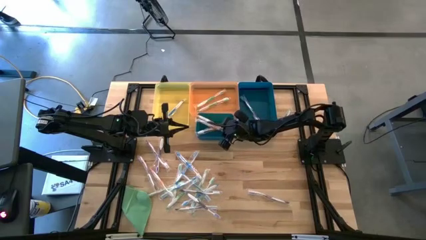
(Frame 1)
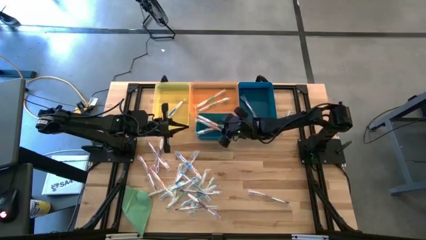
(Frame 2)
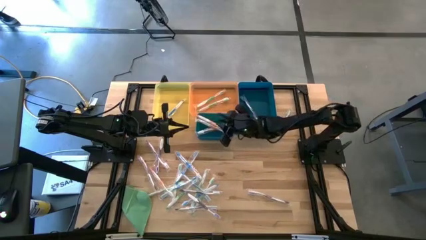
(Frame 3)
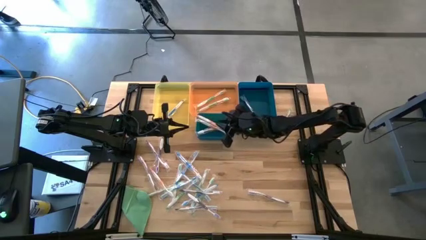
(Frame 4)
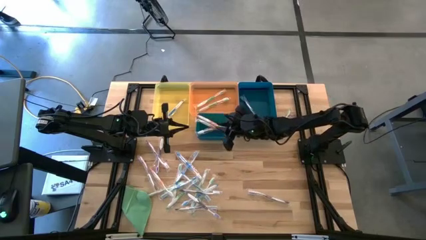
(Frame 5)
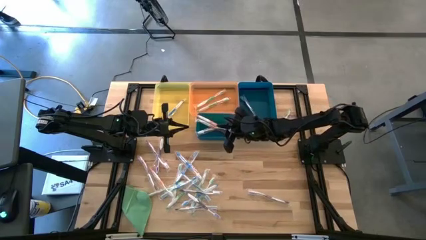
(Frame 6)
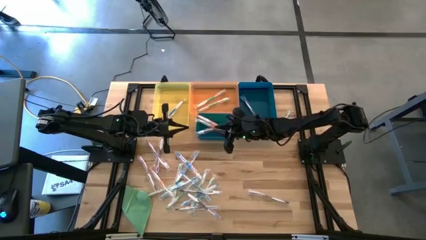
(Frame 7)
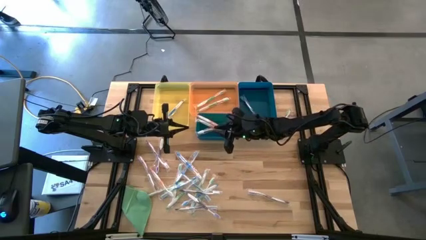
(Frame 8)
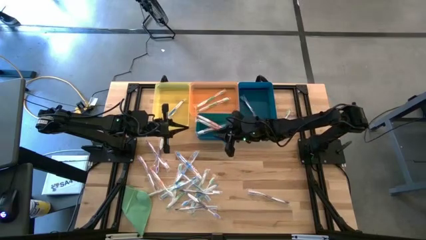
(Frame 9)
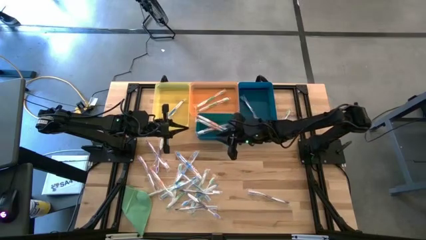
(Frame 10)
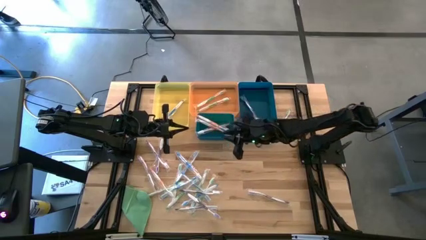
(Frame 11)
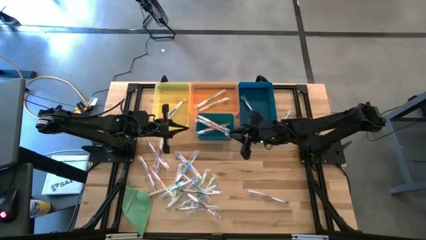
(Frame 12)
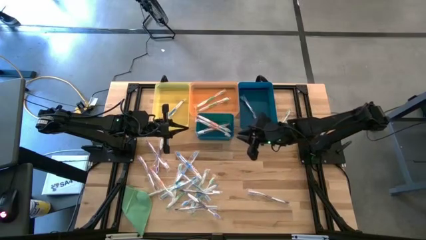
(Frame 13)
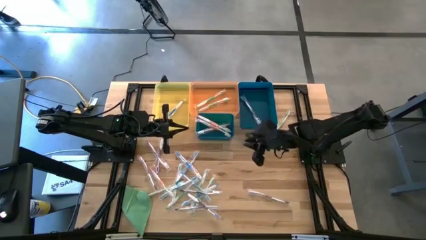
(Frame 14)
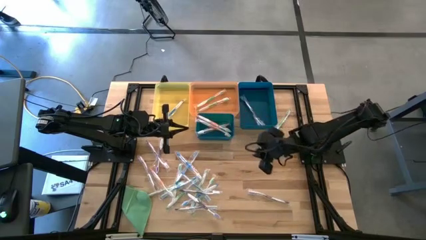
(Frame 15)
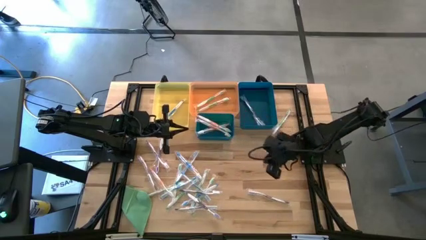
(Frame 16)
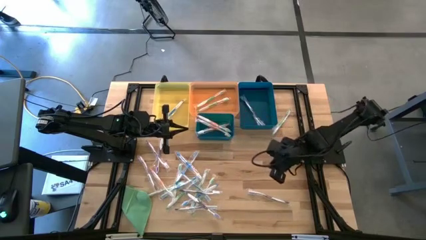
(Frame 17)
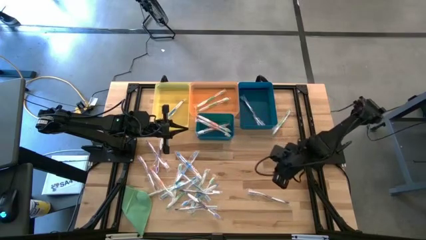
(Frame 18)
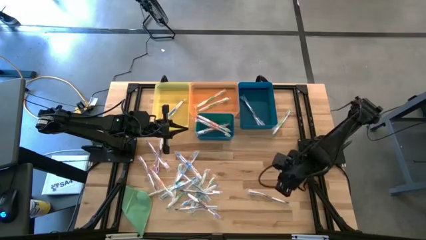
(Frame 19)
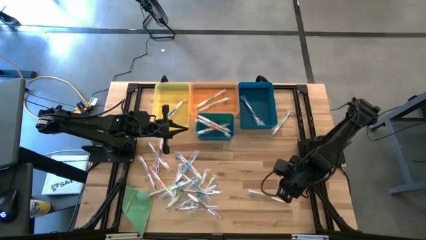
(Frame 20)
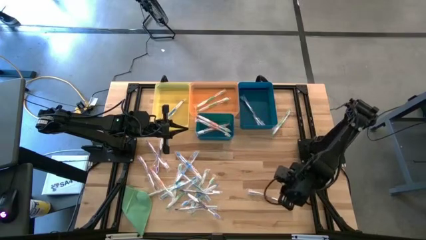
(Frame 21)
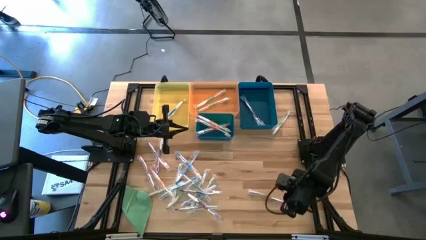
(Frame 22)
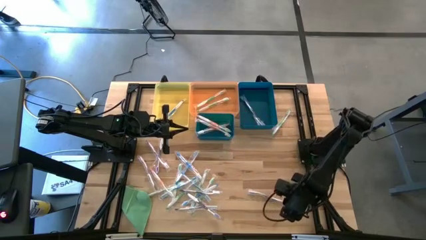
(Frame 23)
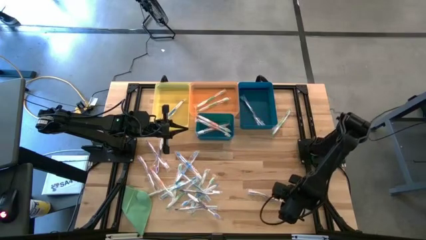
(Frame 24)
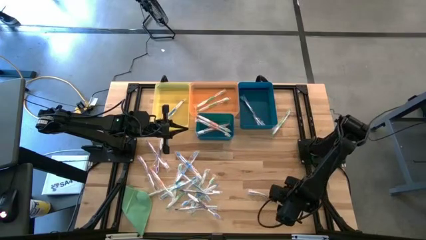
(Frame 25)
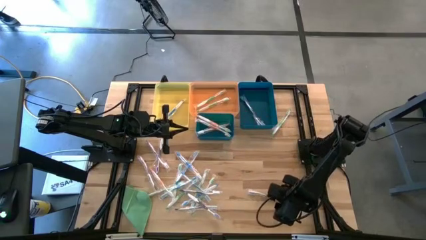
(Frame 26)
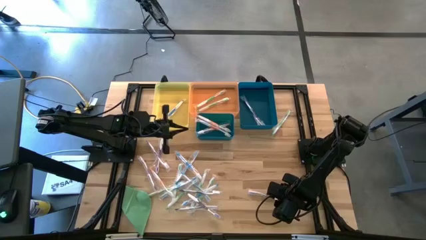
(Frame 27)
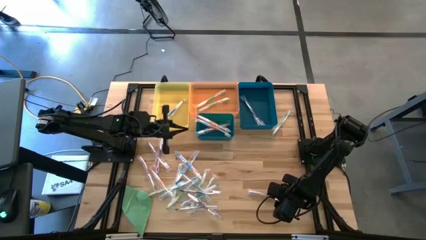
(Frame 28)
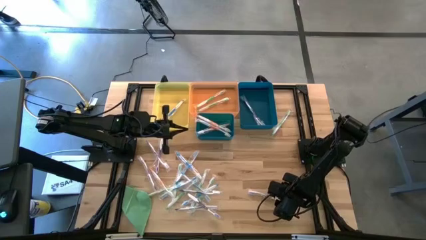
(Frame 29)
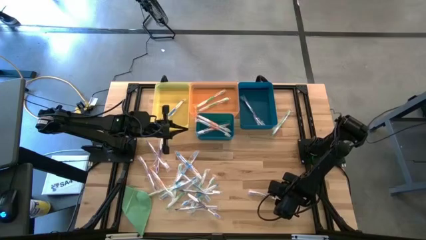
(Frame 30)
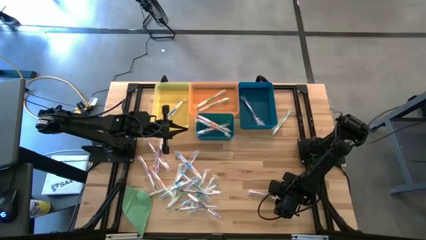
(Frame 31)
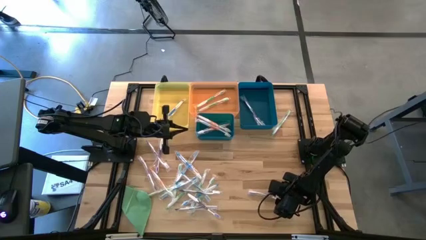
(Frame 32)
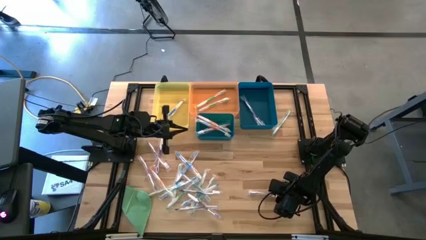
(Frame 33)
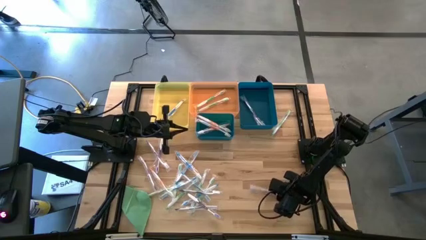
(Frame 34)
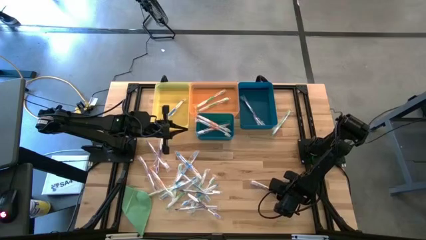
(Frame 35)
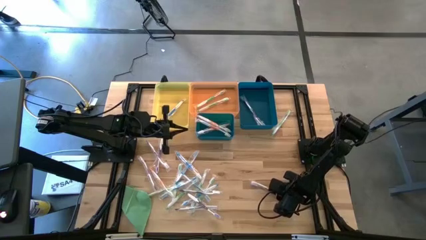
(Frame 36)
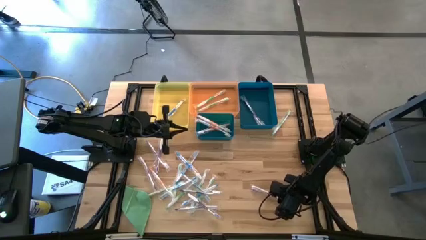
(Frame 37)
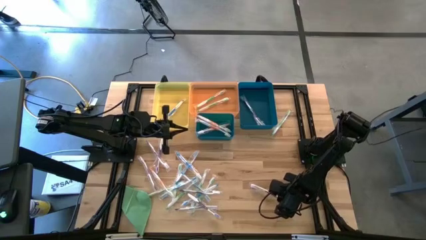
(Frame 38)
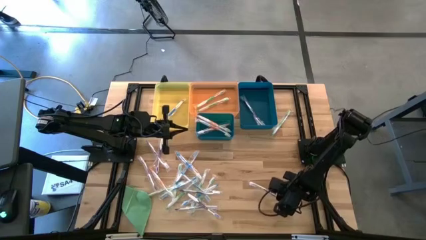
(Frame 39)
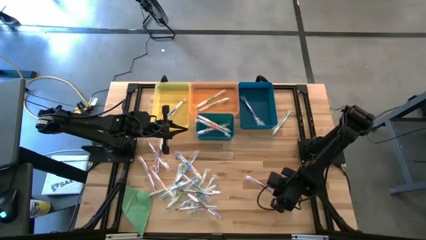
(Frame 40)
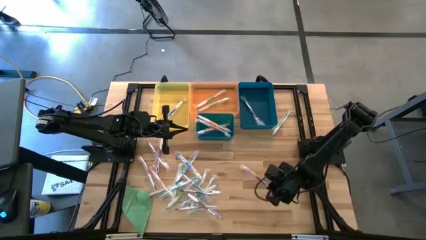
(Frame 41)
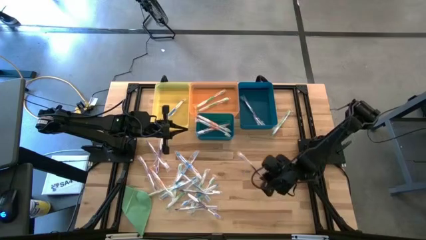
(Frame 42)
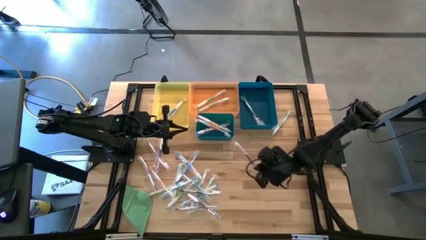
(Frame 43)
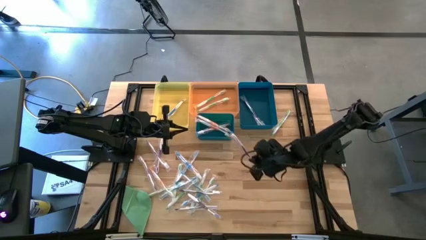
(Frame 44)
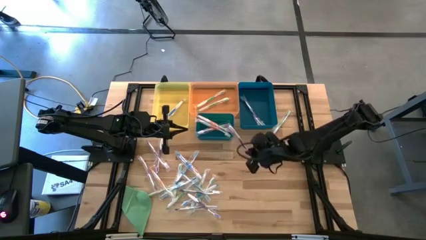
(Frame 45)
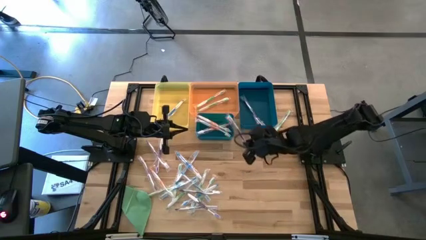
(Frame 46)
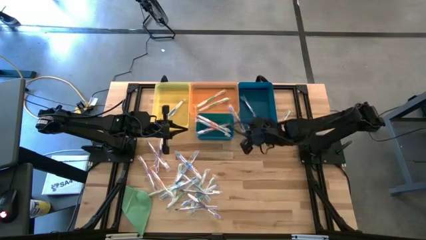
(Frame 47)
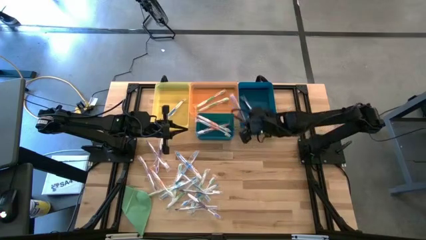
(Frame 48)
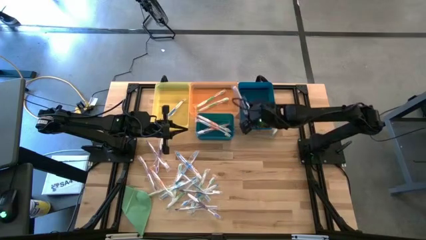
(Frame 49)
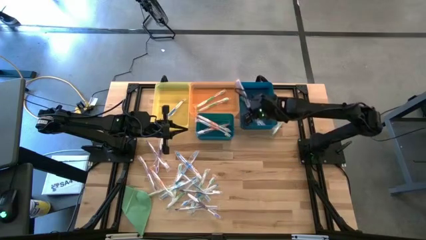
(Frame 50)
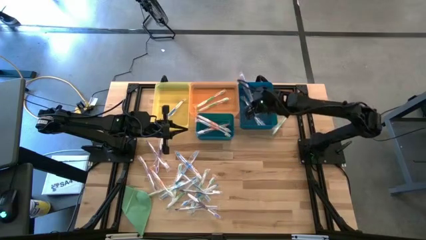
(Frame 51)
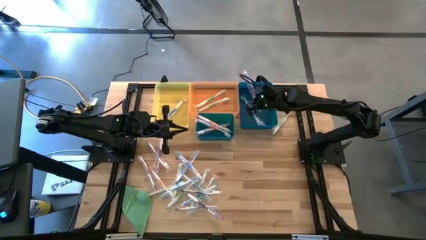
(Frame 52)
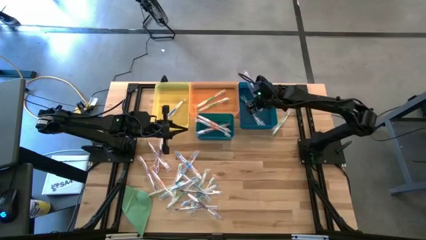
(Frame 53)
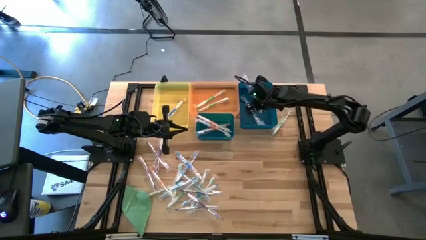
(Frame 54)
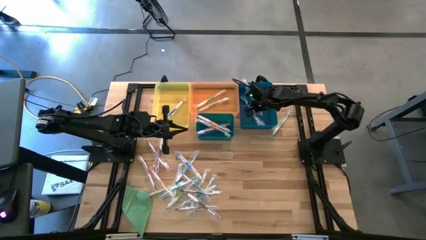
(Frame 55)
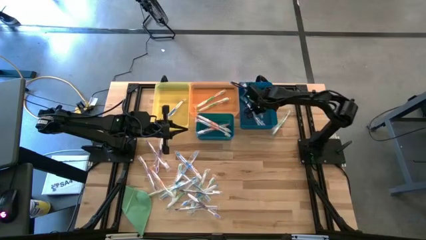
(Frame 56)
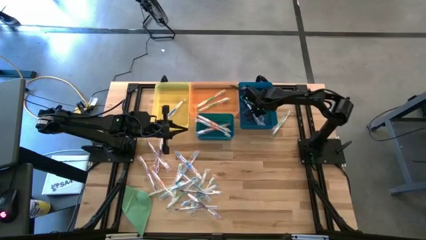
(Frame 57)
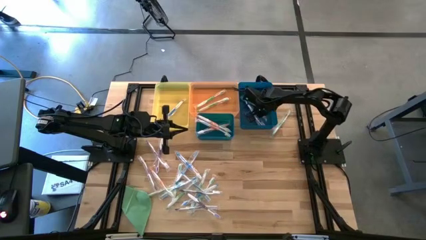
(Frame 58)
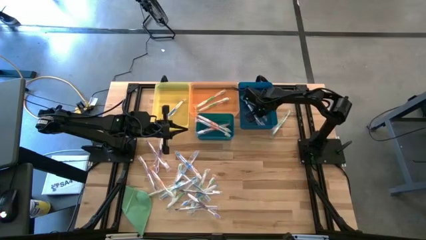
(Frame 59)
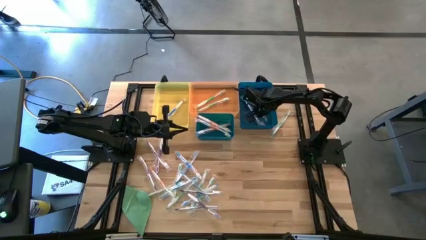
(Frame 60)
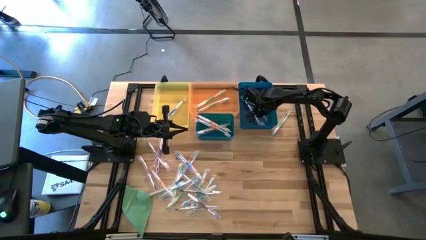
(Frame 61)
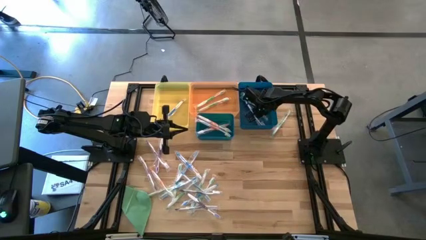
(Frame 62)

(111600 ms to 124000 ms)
Task: Pick & Place Toothbrushes
Put the purple toothbrush into the blue bin
